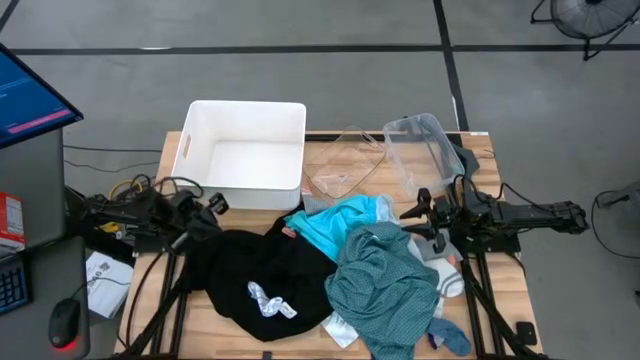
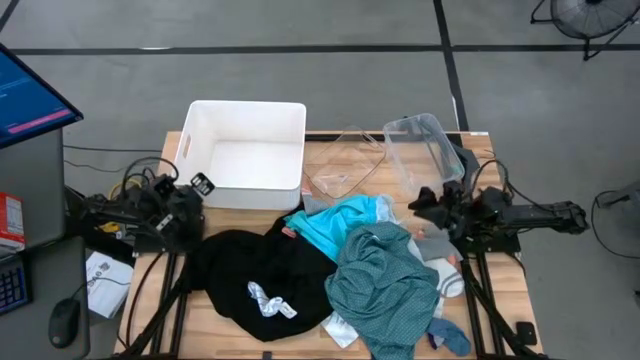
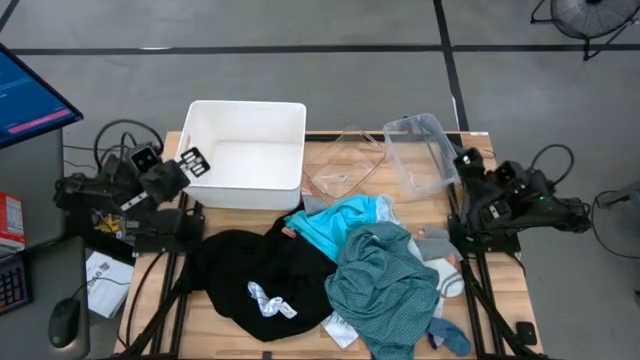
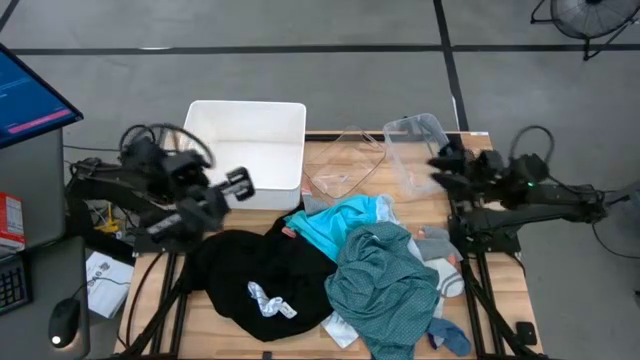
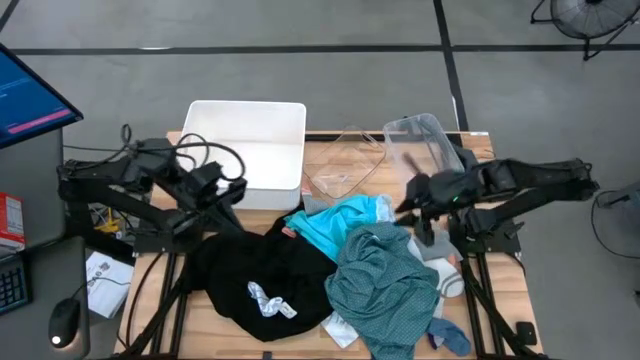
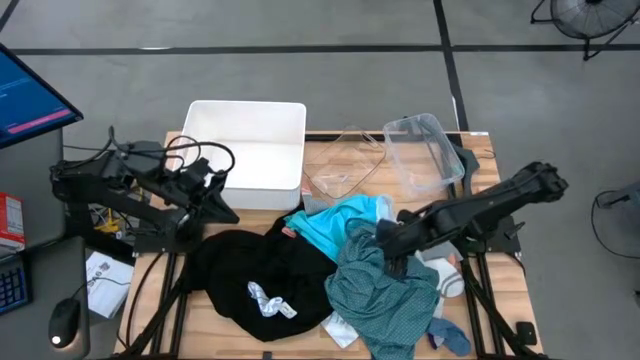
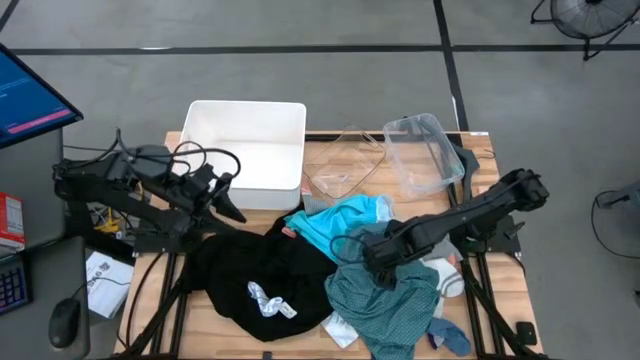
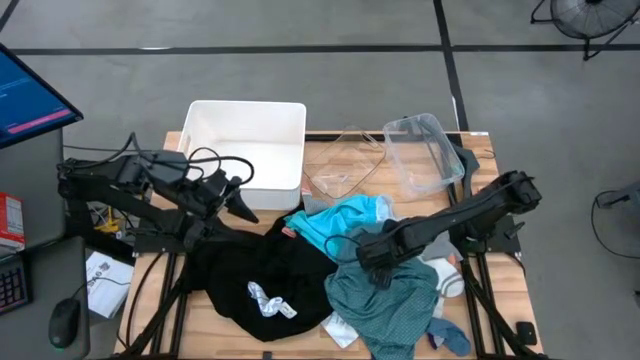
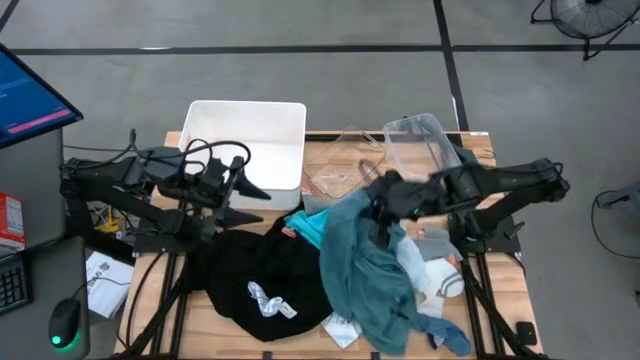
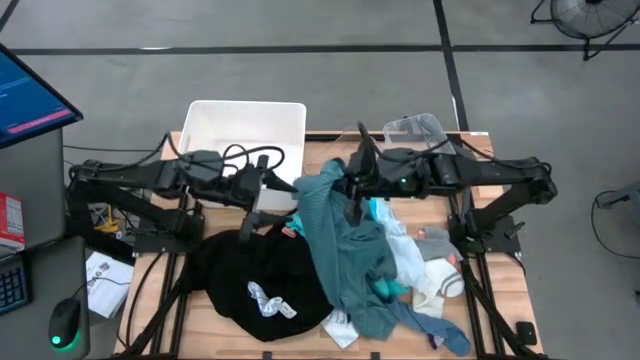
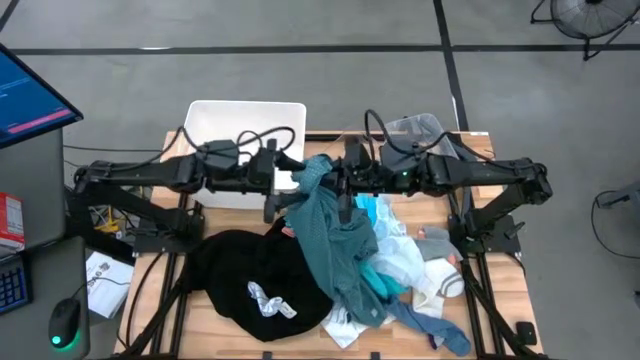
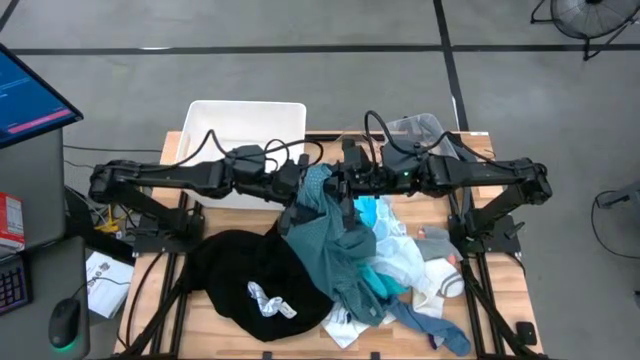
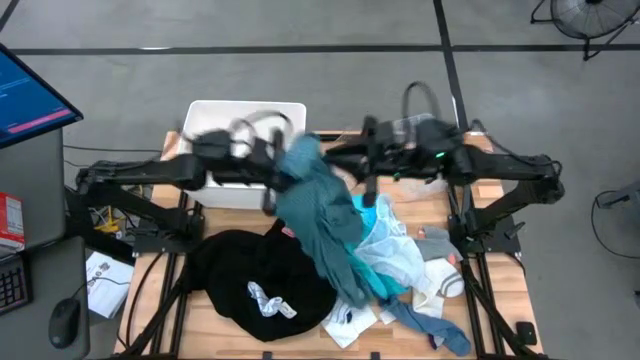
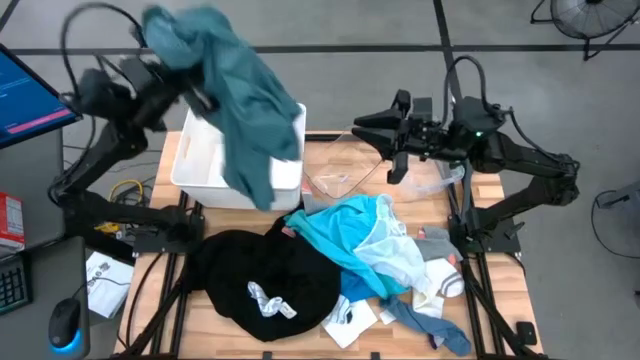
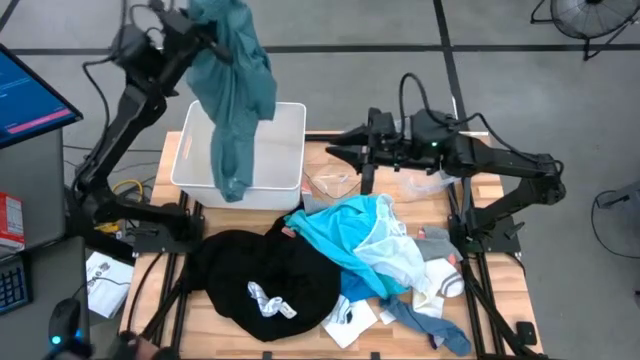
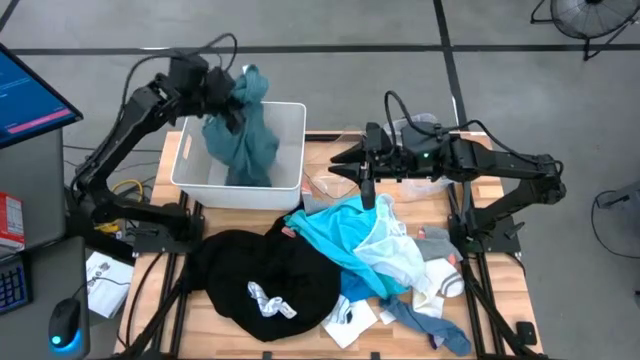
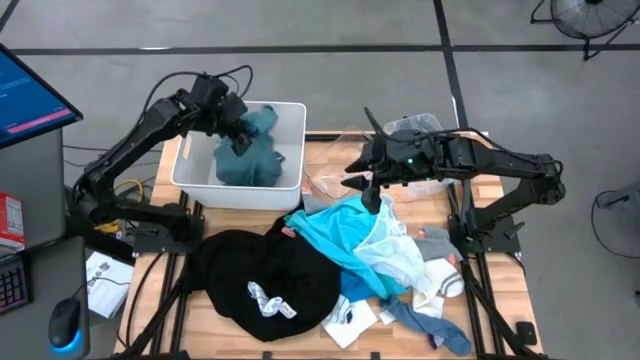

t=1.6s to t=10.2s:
Task: Pick & Place Cloths
Put the blue gown into the white bin

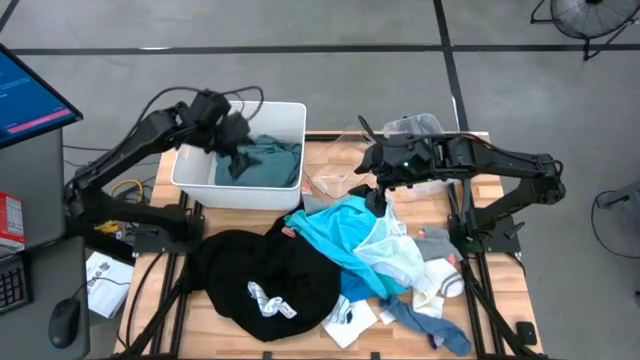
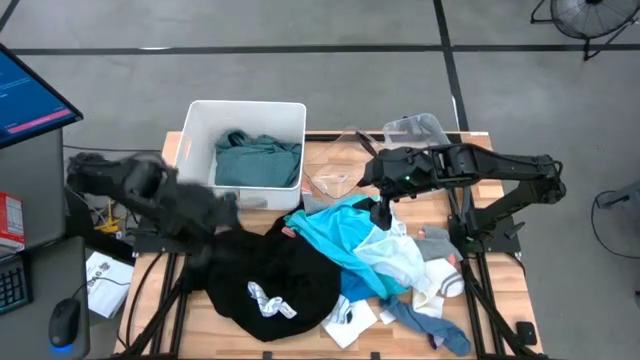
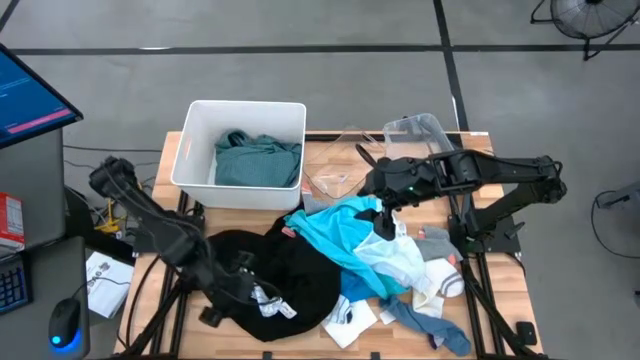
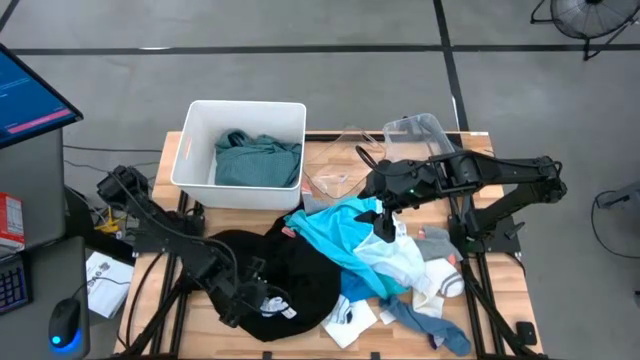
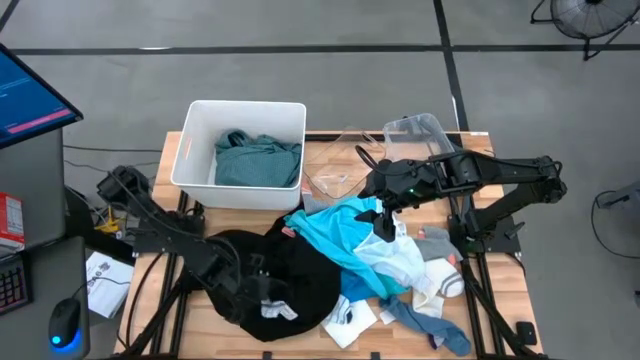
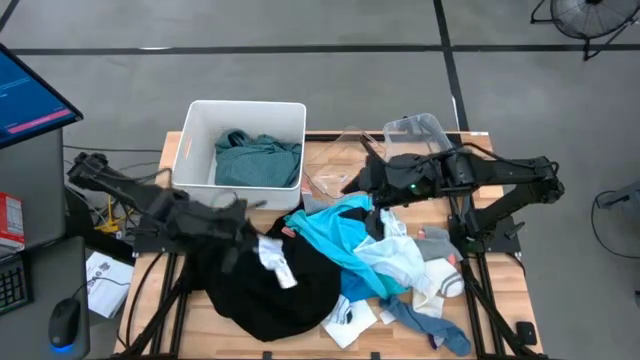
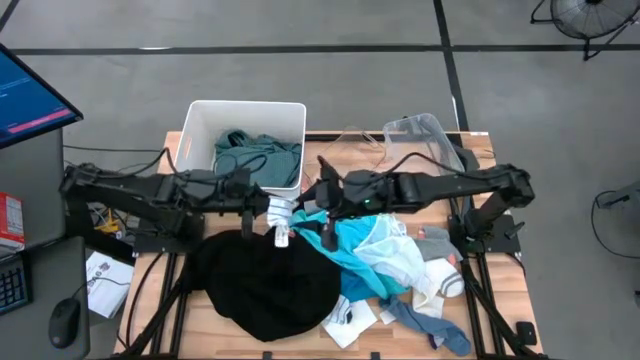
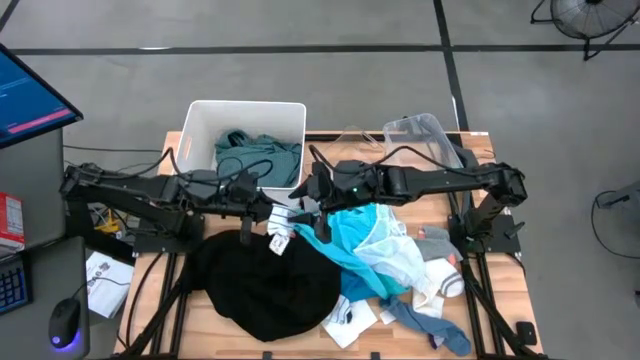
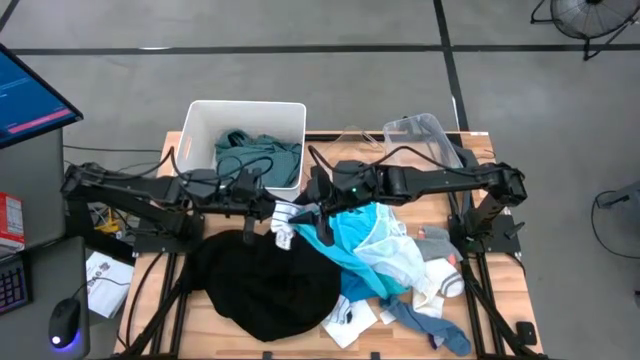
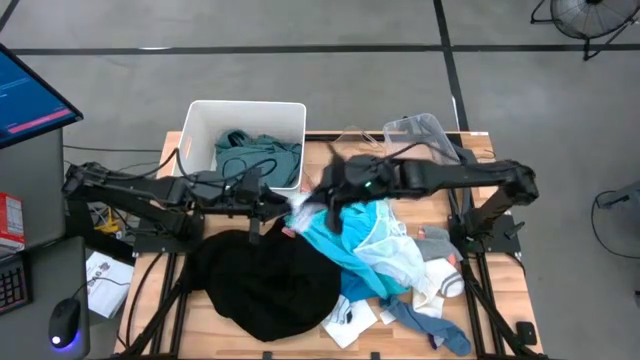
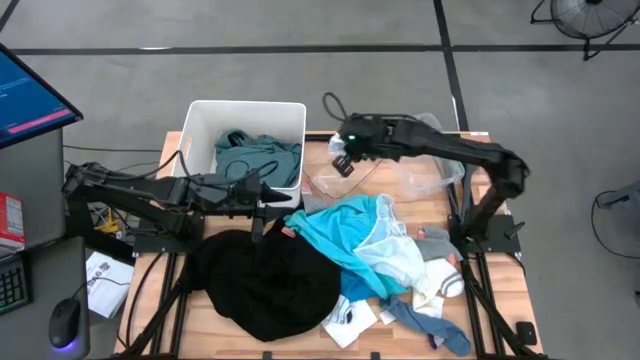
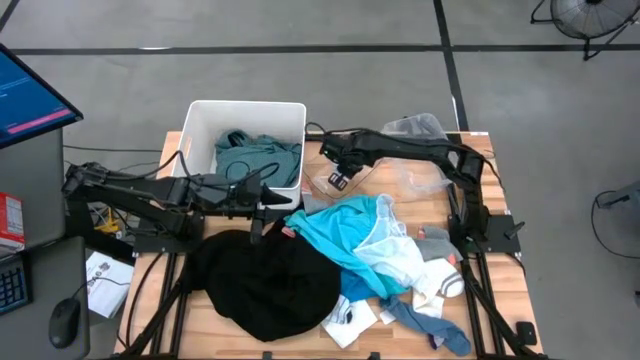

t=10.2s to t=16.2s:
Put the white and blue sock into the middle transparent bin

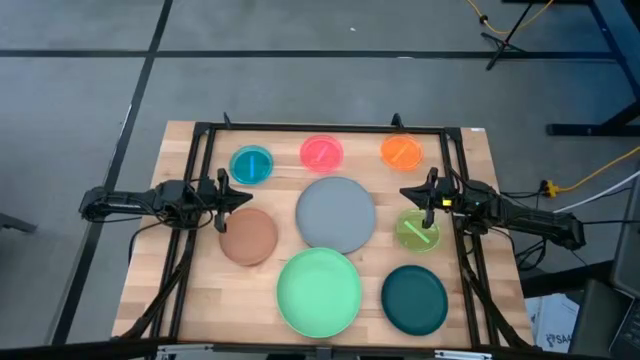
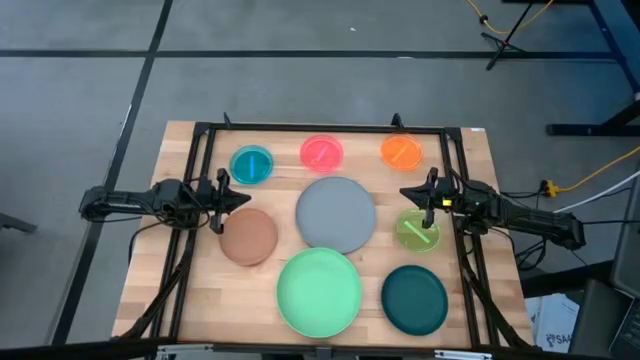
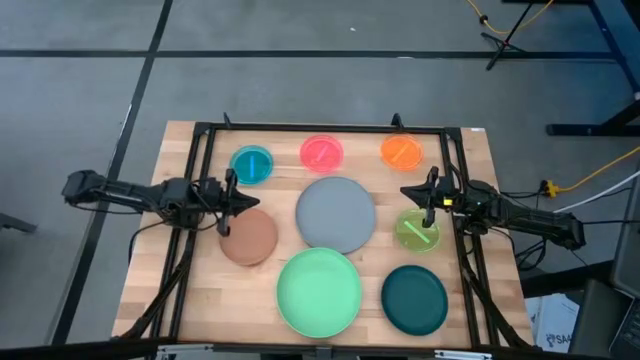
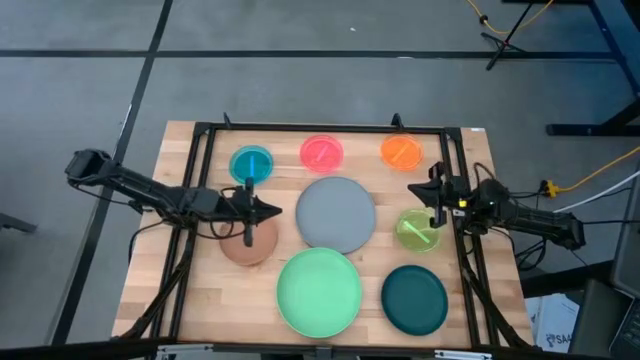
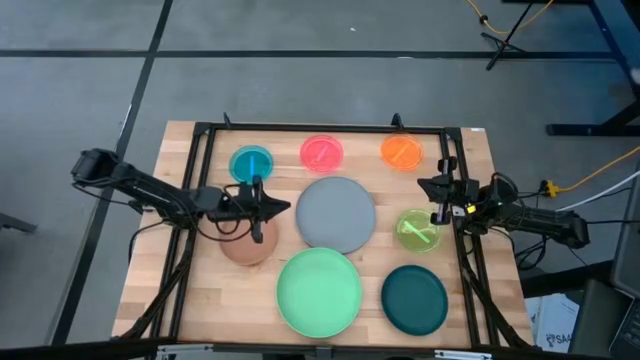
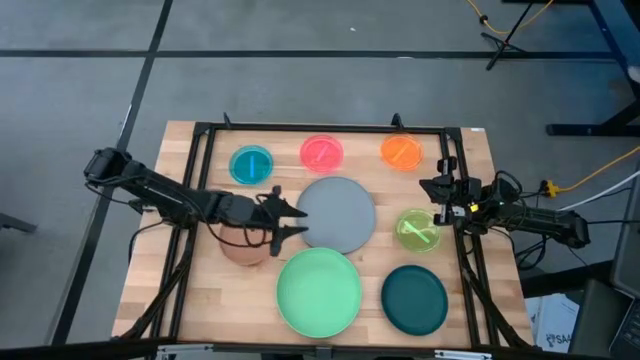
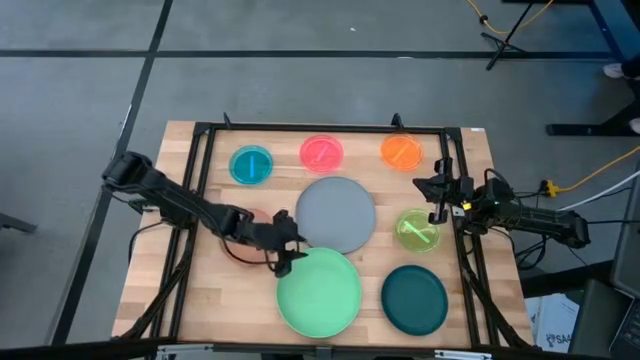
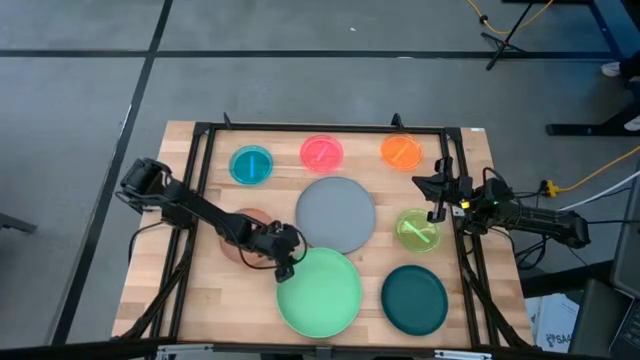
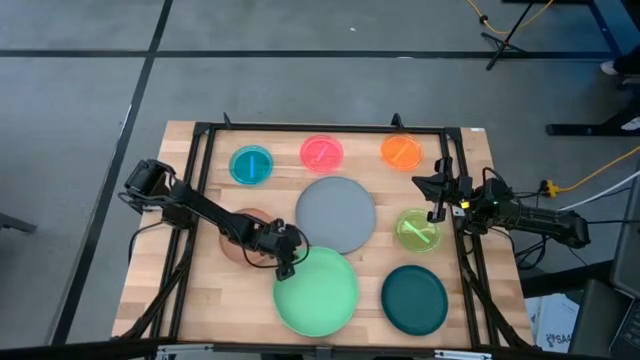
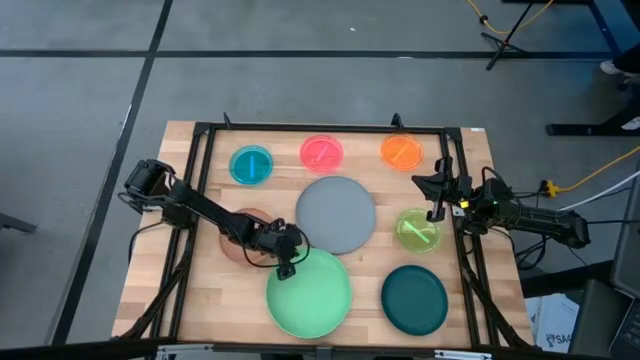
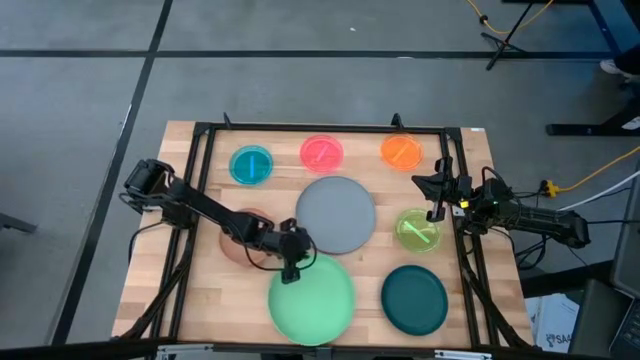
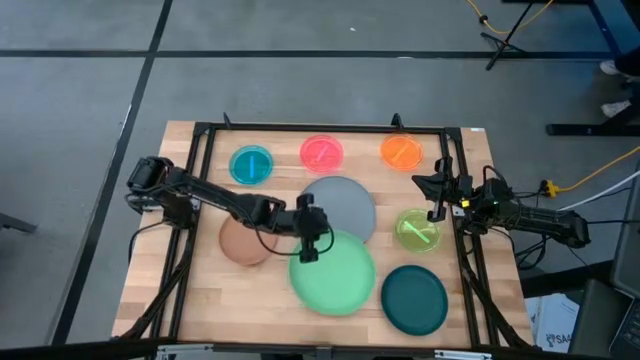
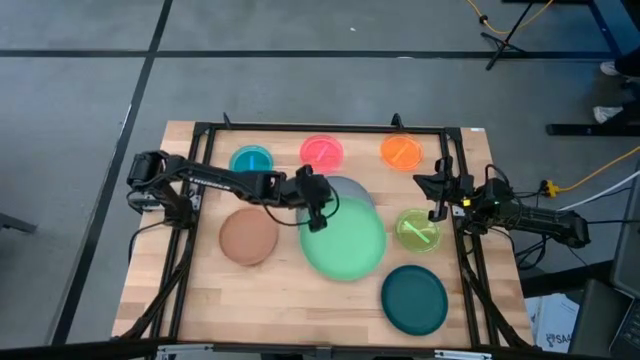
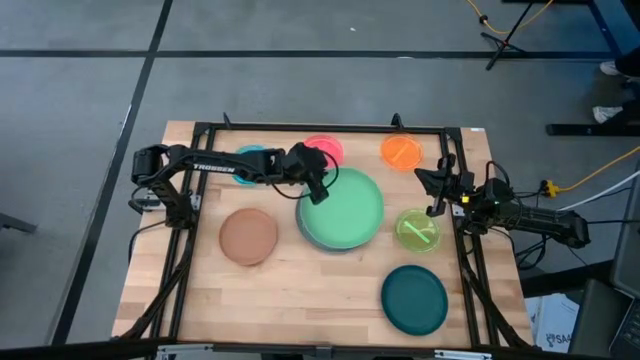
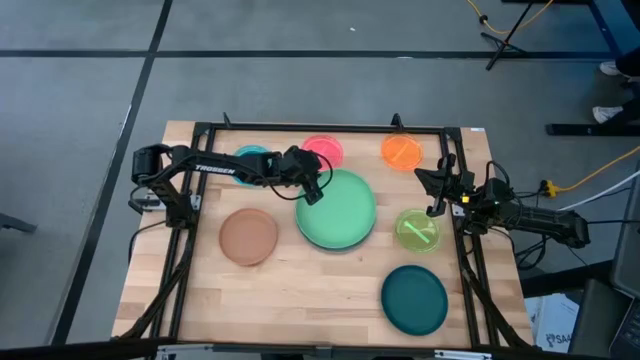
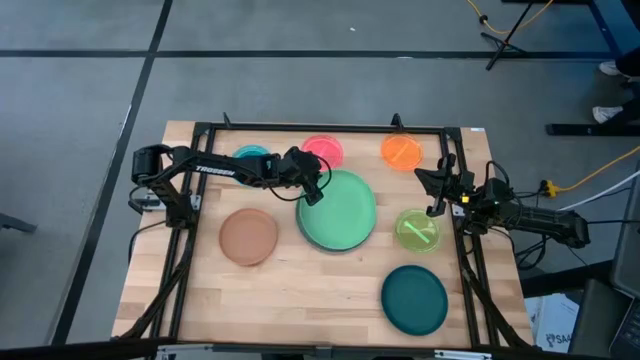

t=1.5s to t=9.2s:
Task: Stack plastic plates
Stack the light green plate on top of the gray plate
